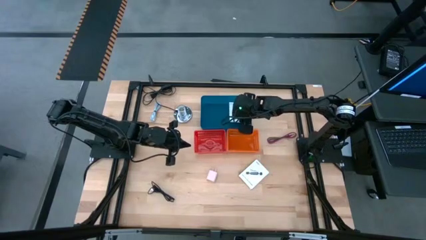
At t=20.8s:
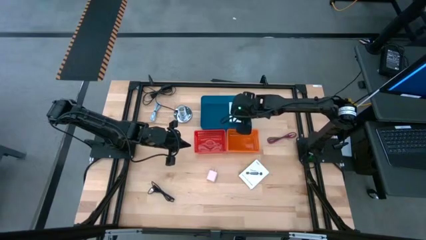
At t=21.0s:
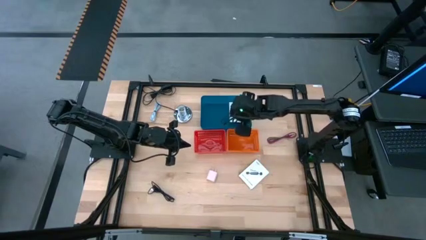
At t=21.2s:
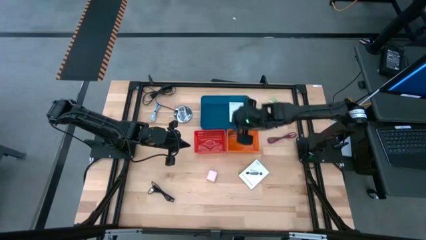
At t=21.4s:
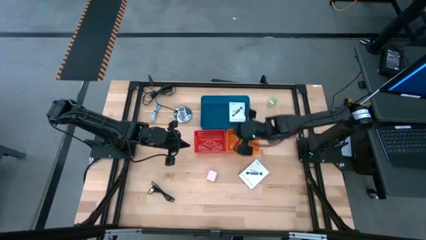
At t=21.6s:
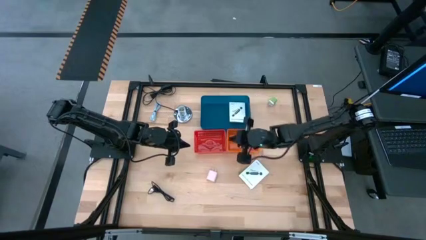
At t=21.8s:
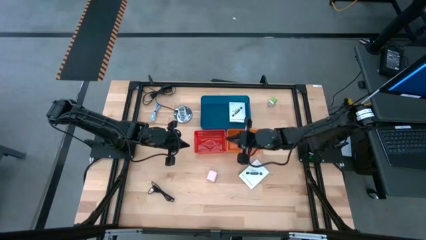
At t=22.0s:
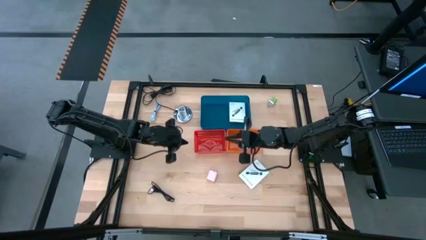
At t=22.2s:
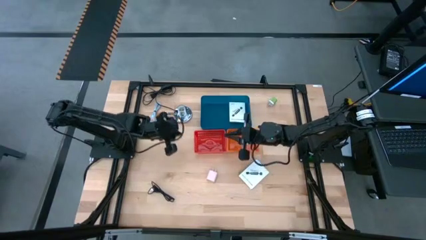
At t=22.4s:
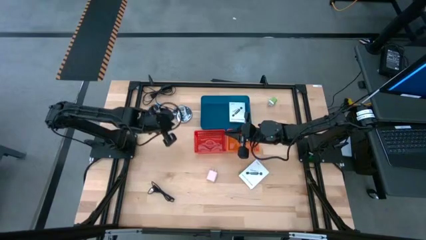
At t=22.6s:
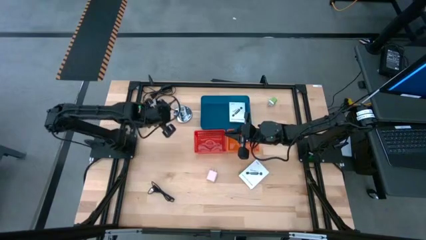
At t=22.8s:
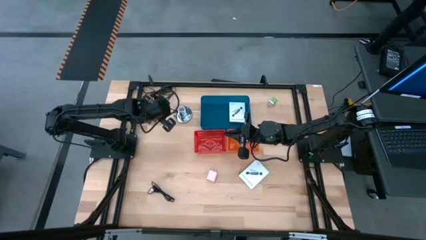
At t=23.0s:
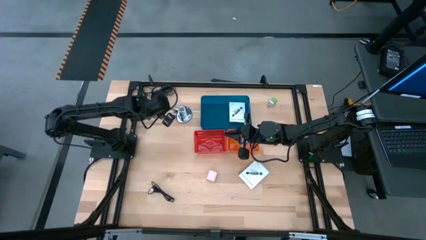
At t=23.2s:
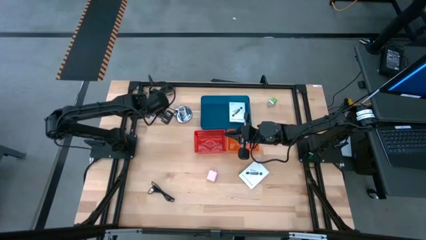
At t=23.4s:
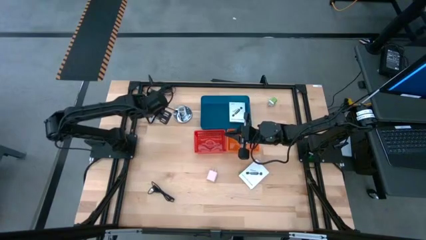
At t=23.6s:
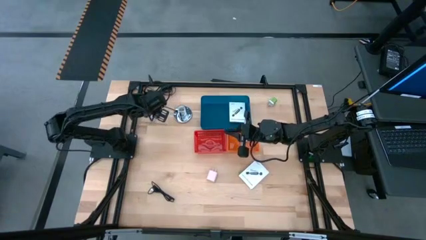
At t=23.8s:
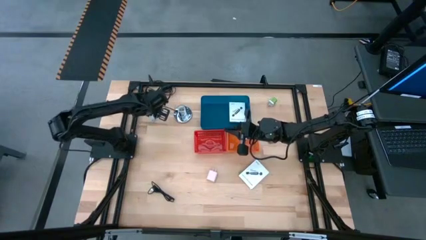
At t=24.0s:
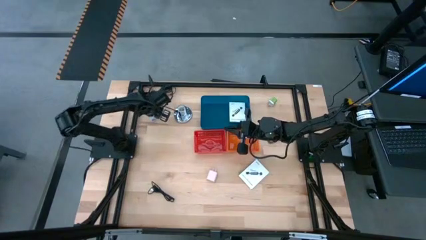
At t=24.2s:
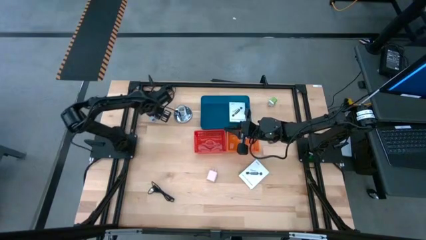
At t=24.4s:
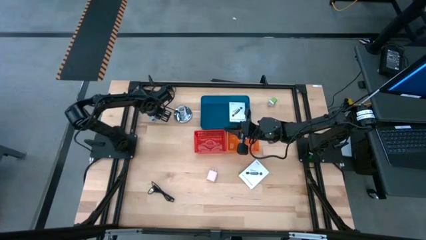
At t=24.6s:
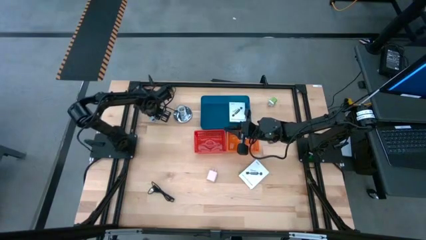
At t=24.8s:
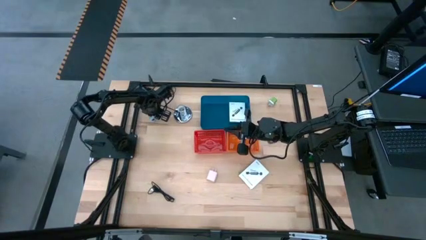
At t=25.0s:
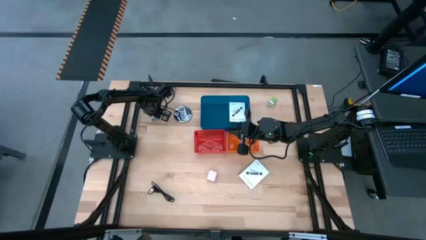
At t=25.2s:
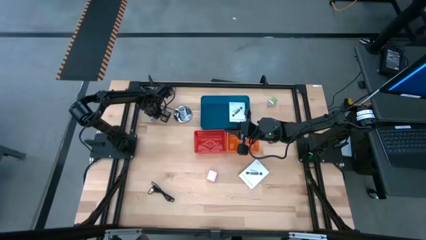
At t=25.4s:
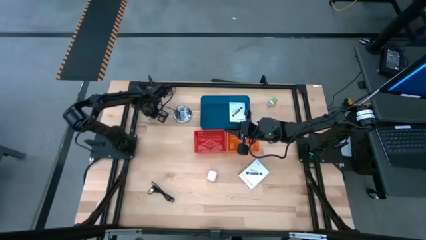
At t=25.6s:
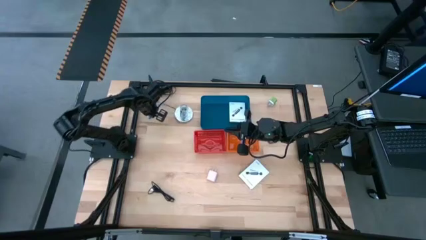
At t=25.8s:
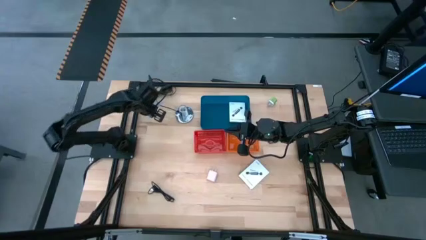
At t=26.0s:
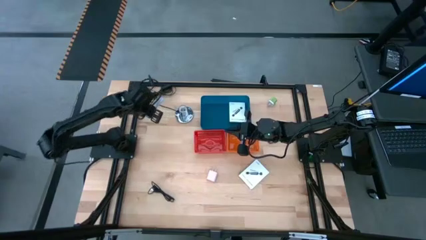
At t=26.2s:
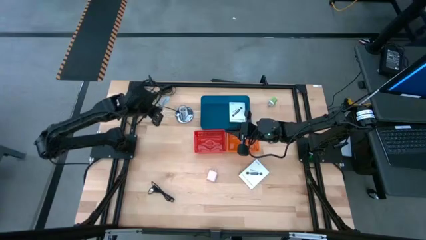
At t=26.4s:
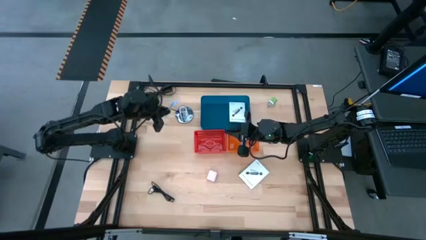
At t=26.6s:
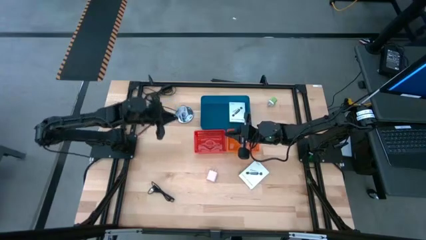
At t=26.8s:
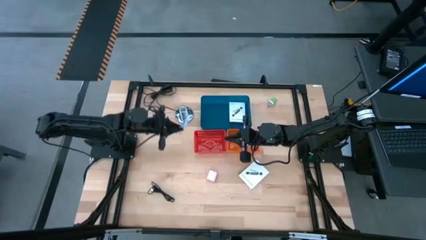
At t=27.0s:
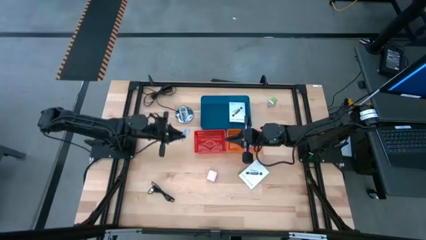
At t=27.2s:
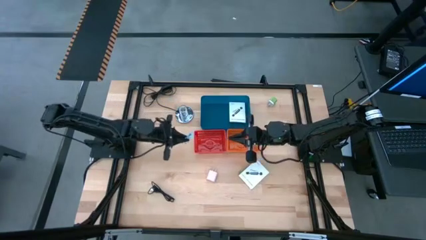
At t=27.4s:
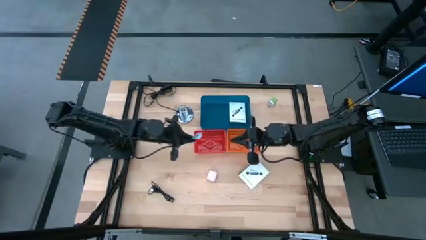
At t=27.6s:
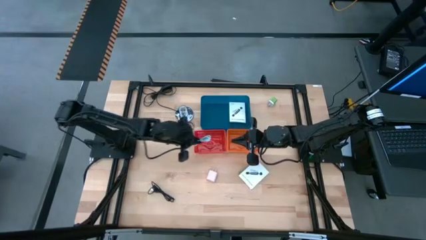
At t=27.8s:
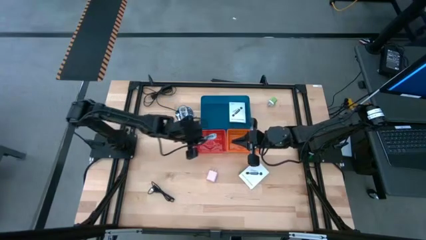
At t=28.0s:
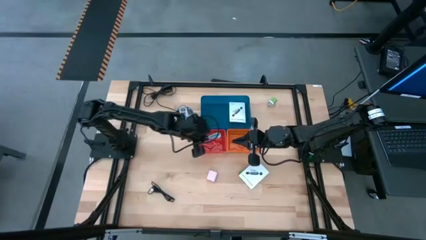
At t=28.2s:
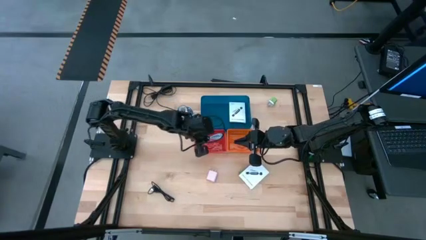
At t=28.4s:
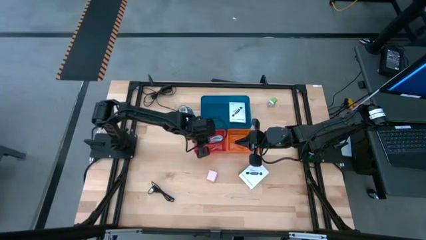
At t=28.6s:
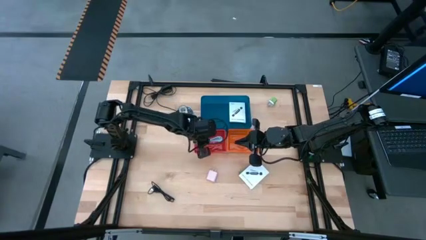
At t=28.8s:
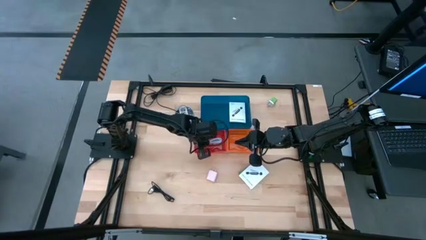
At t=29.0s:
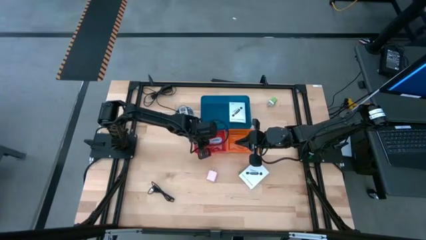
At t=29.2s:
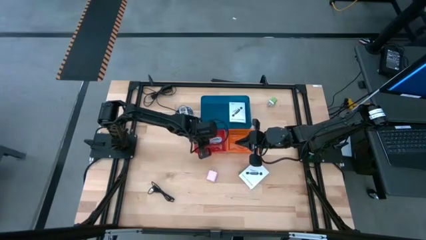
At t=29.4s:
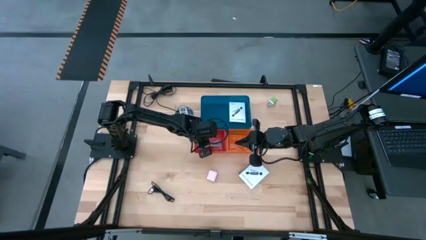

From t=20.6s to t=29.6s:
Task: Pick and place items into bin
Put the white charger cable into the red bin

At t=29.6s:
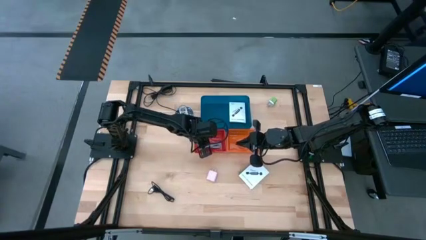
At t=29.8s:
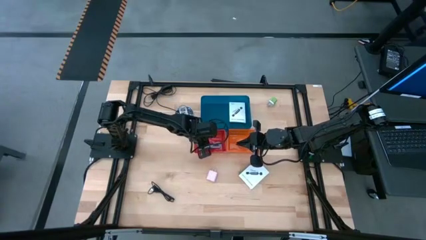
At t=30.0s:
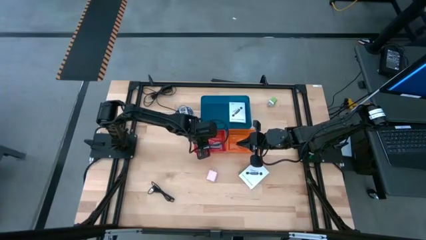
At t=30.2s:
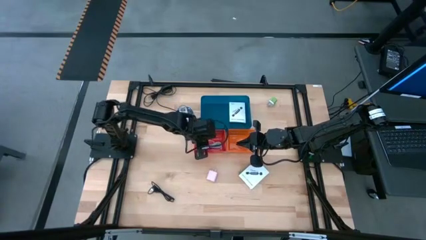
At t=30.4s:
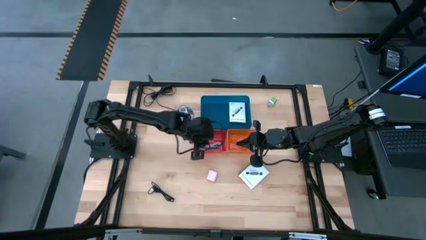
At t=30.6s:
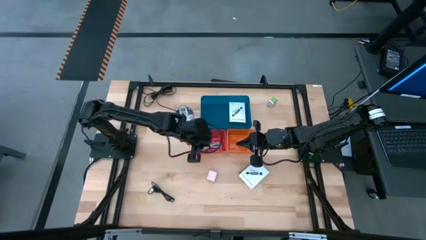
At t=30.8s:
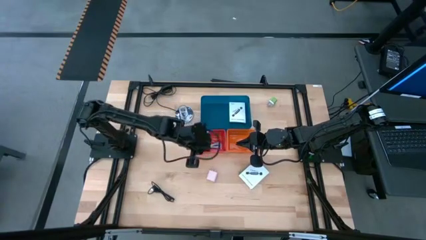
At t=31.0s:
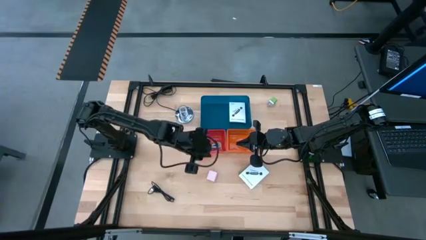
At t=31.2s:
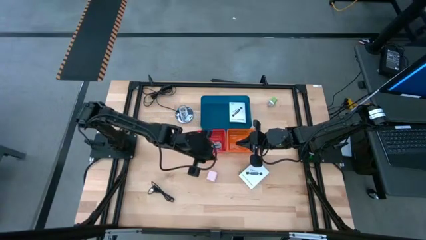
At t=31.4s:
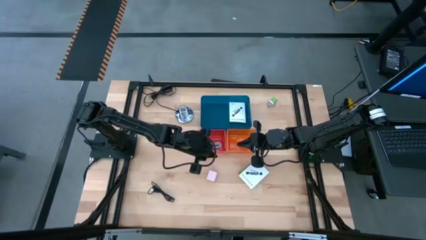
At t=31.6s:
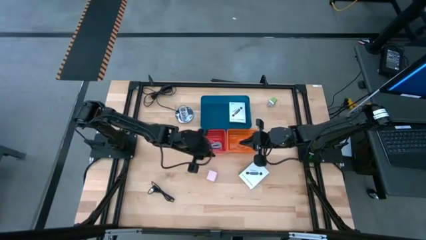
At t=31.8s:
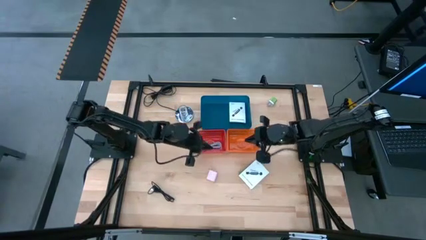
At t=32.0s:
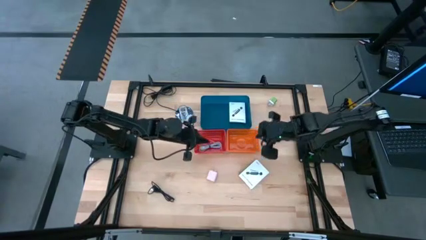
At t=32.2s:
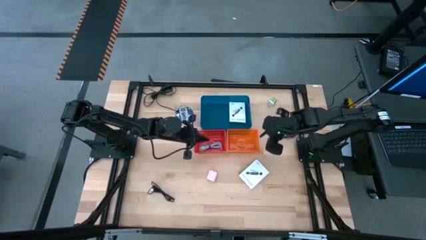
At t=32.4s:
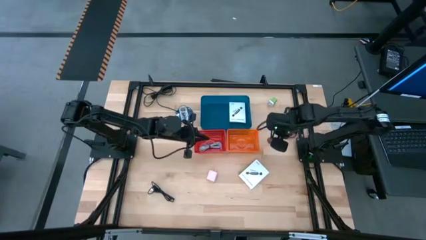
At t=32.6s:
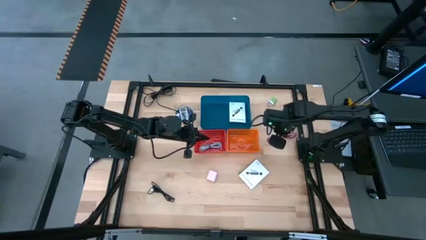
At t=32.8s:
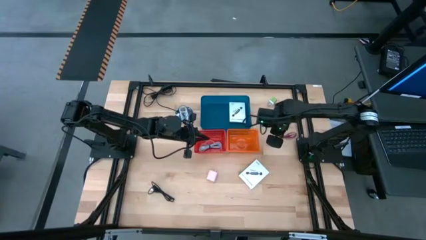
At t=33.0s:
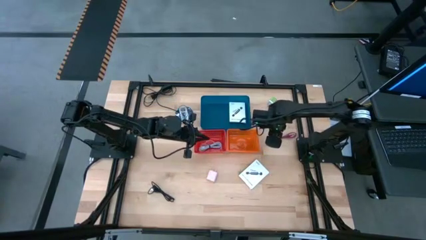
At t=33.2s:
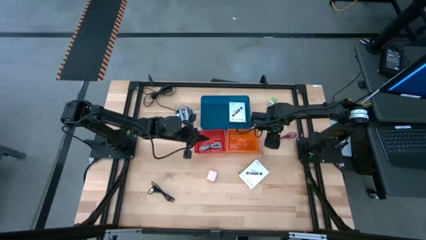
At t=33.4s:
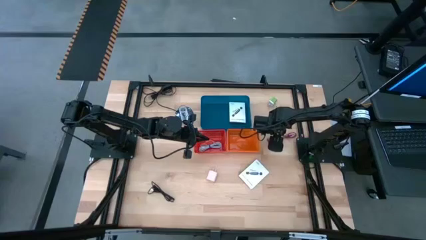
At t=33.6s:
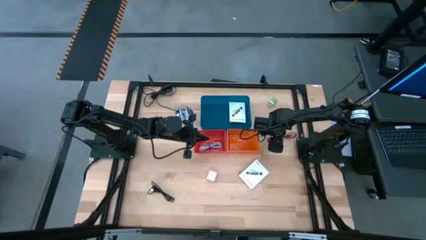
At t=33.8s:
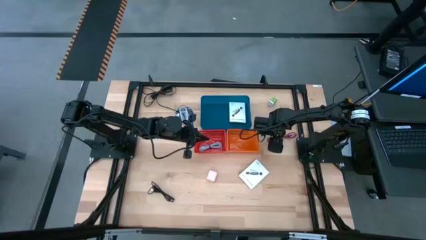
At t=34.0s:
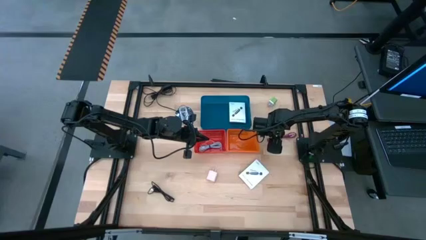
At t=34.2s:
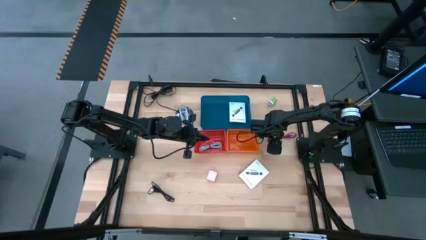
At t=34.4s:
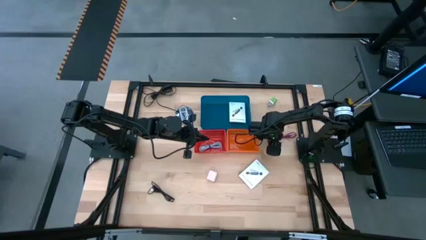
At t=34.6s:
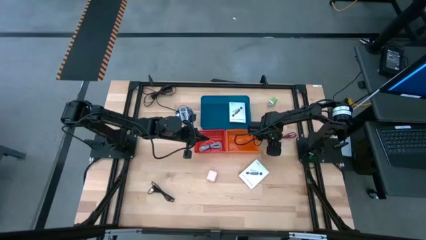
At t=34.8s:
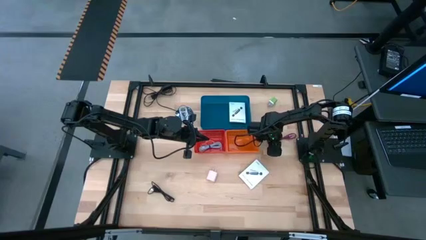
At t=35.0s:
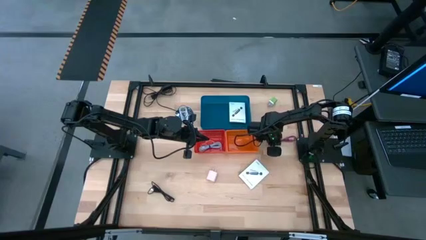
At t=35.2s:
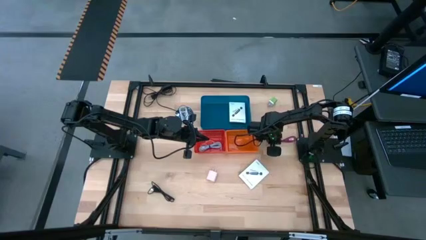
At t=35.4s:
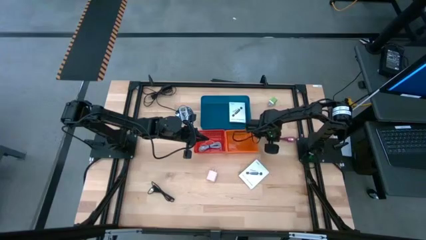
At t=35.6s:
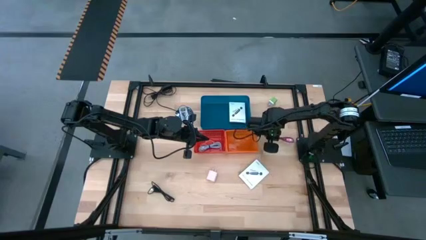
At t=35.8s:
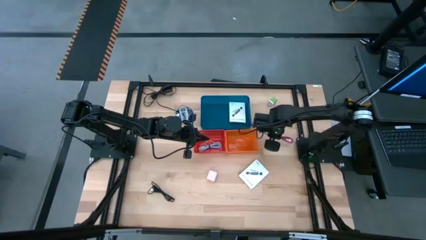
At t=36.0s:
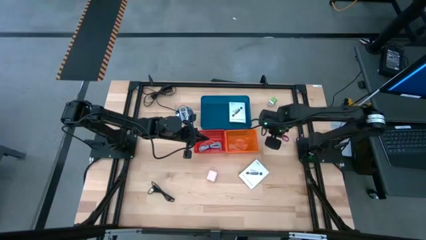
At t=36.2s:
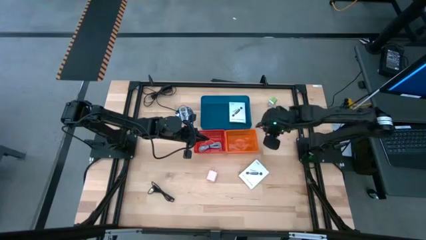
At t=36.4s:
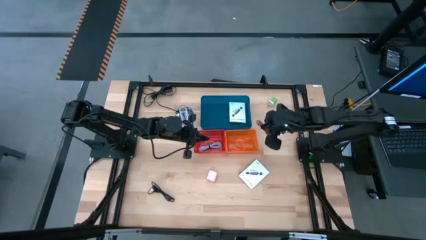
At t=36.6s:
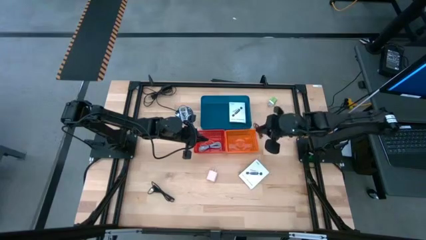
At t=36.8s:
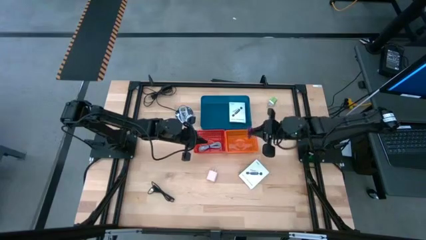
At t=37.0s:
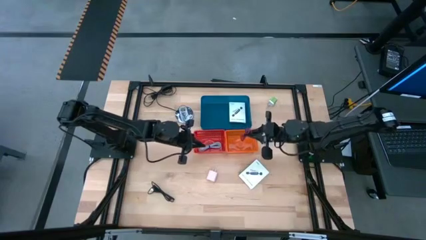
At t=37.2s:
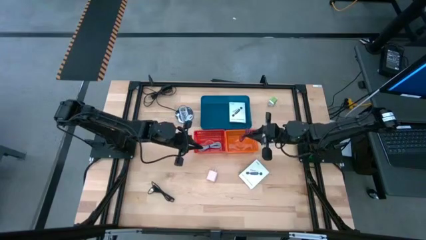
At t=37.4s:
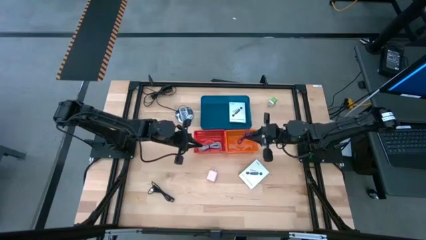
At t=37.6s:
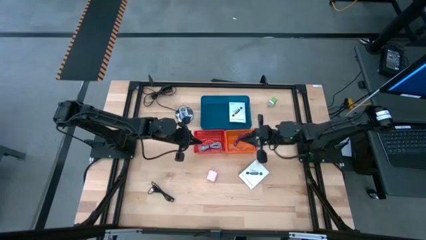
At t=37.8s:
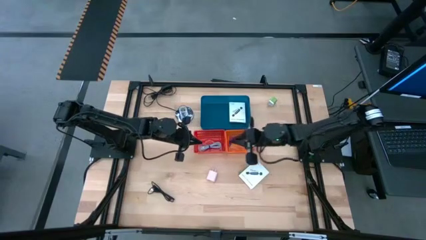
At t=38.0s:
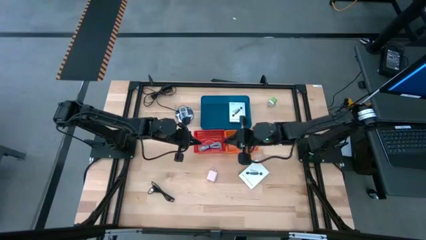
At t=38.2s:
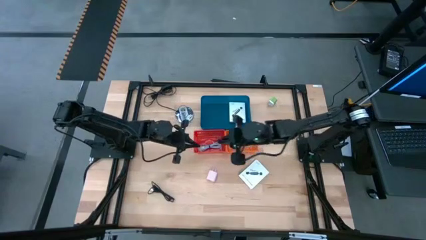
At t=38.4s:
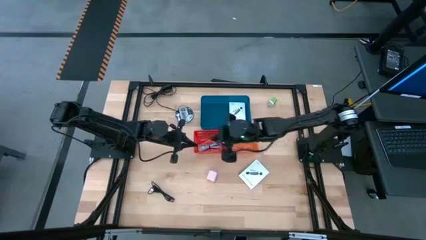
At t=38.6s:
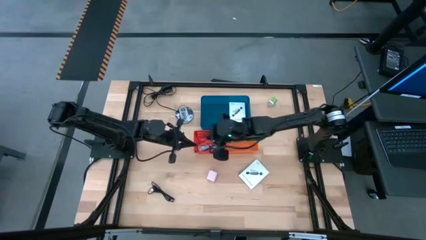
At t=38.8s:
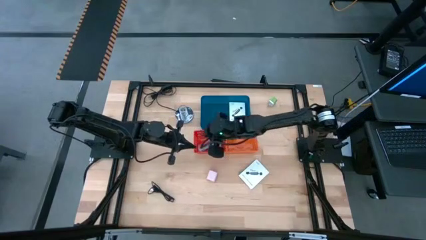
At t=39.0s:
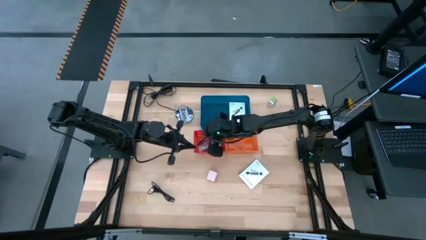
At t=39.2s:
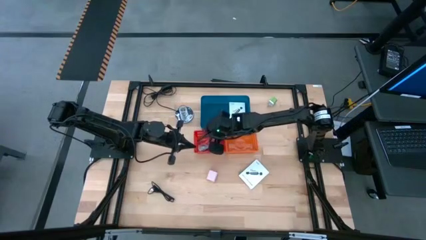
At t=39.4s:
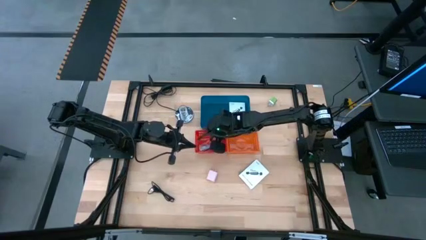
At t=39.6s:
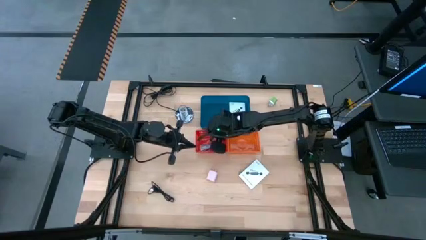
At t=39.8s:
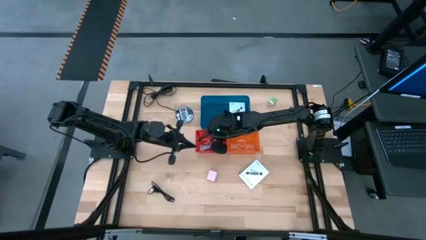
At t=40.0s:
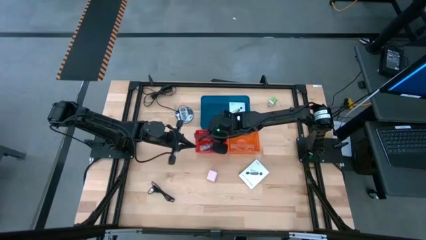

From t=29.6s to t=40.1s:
Put the red charger cable into the red bin
